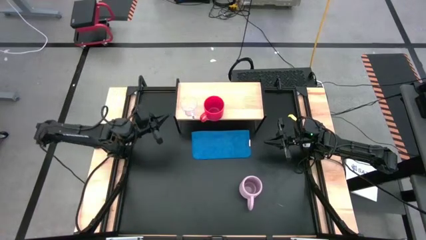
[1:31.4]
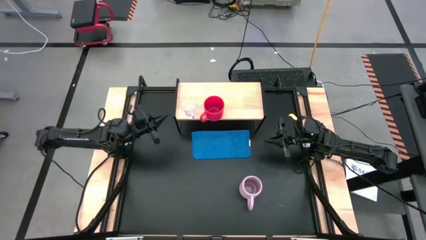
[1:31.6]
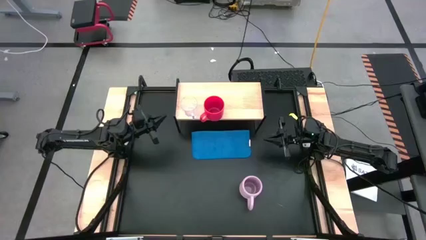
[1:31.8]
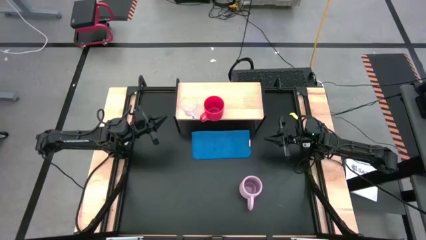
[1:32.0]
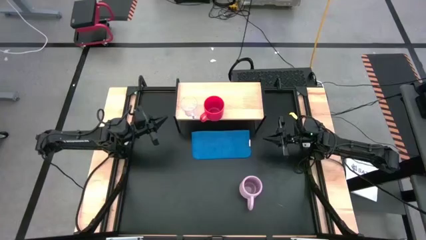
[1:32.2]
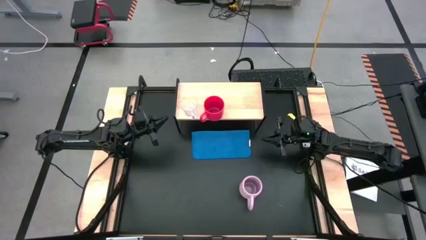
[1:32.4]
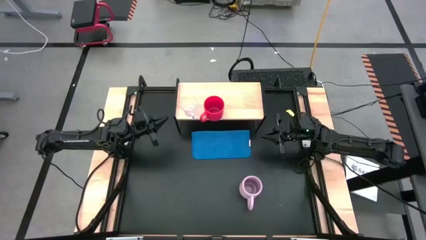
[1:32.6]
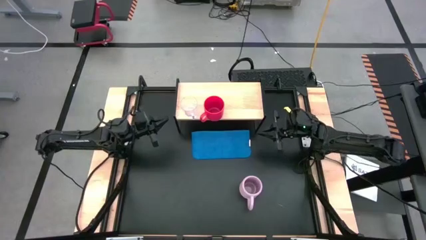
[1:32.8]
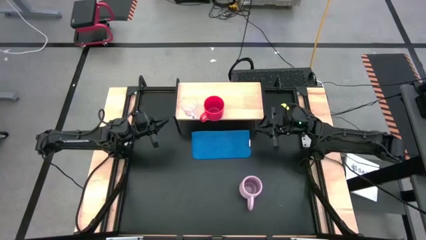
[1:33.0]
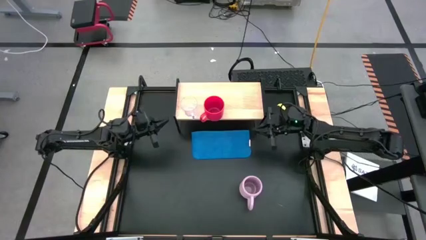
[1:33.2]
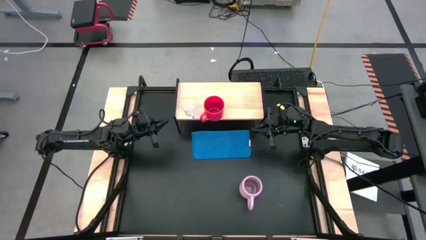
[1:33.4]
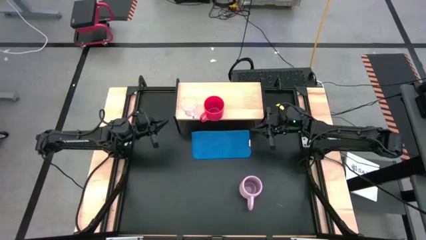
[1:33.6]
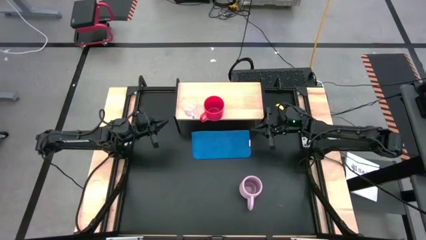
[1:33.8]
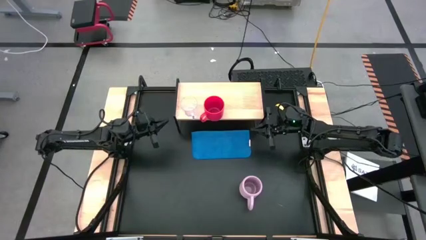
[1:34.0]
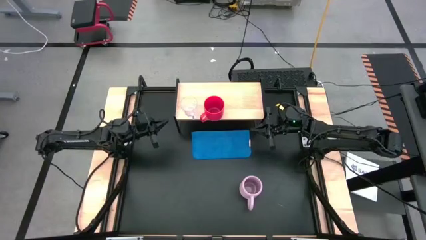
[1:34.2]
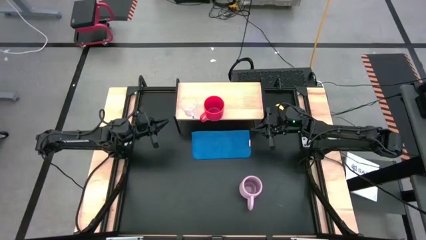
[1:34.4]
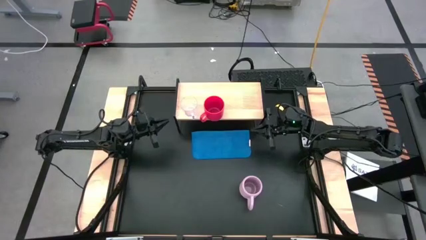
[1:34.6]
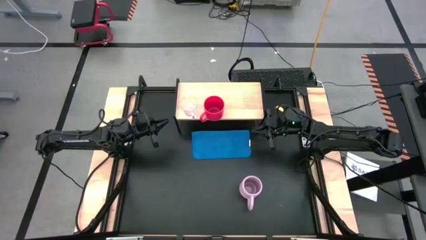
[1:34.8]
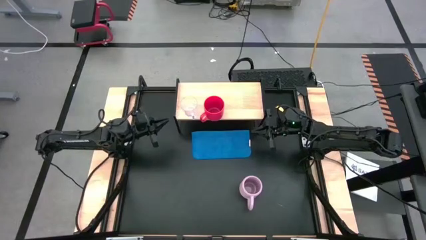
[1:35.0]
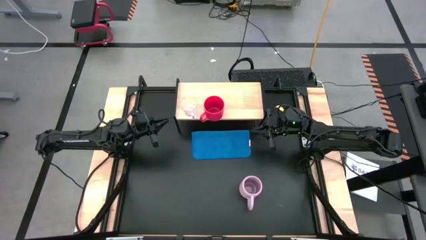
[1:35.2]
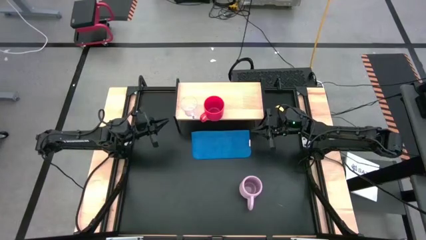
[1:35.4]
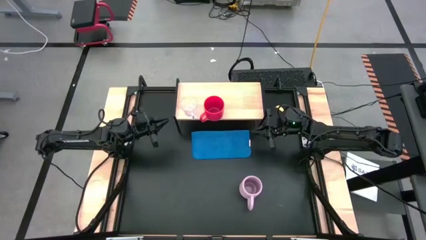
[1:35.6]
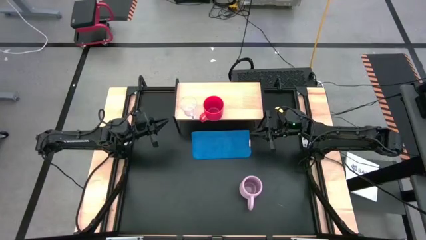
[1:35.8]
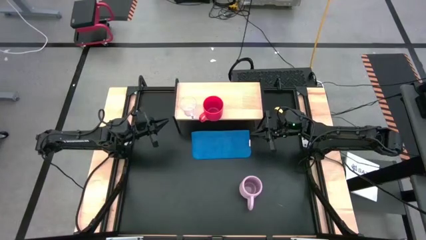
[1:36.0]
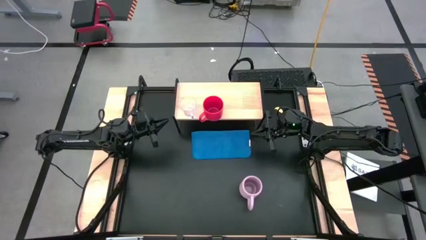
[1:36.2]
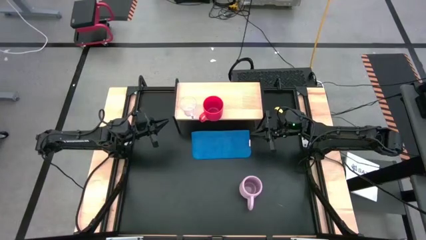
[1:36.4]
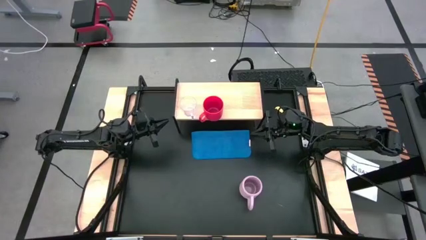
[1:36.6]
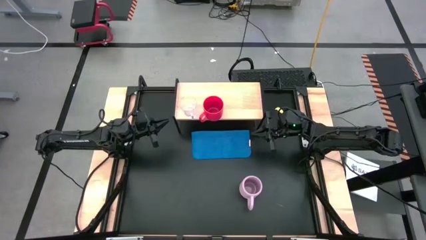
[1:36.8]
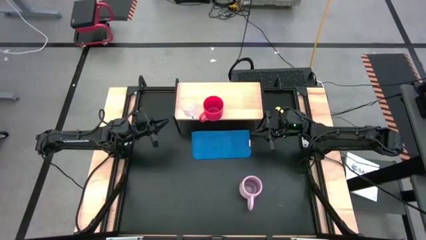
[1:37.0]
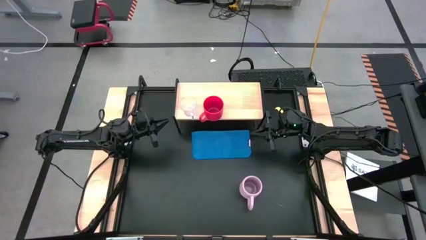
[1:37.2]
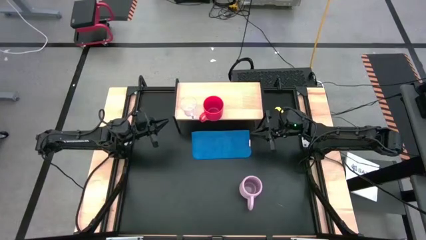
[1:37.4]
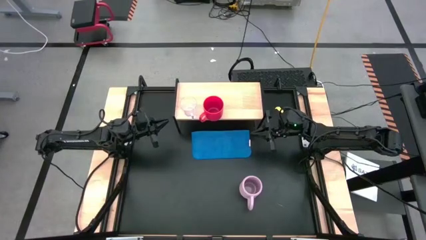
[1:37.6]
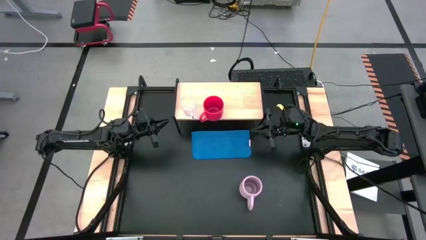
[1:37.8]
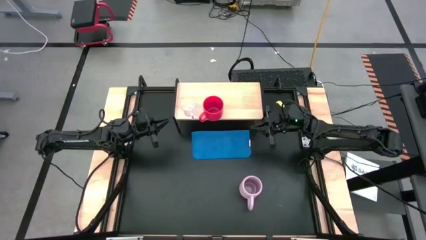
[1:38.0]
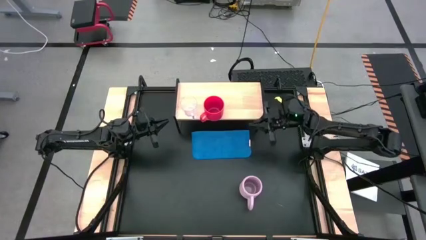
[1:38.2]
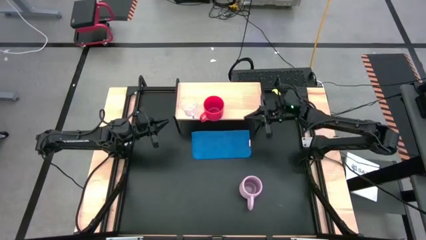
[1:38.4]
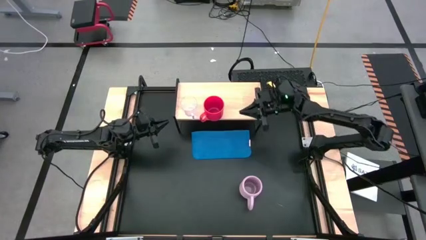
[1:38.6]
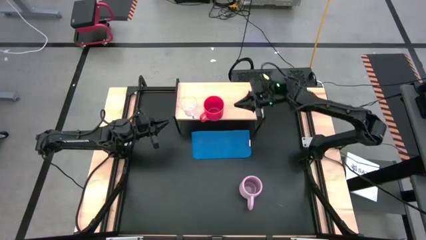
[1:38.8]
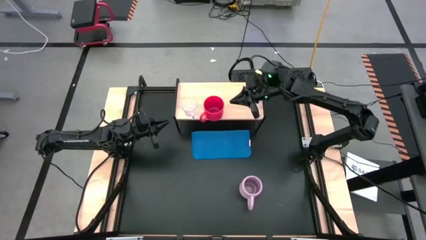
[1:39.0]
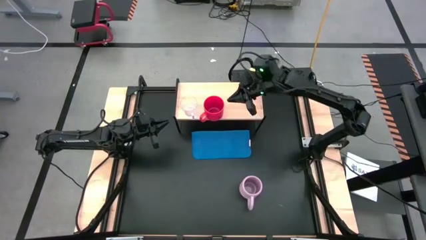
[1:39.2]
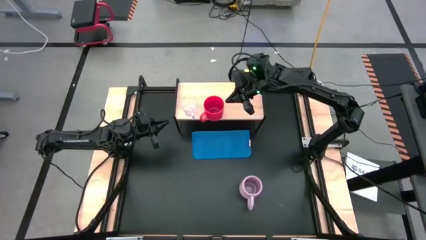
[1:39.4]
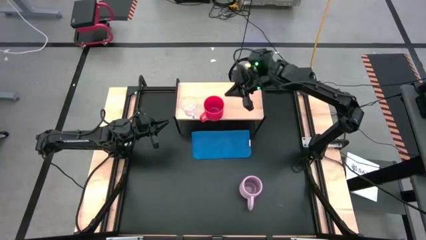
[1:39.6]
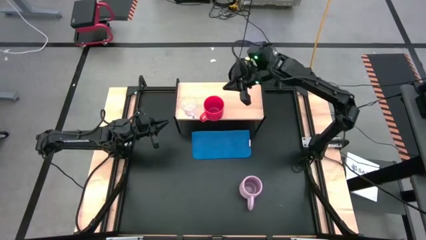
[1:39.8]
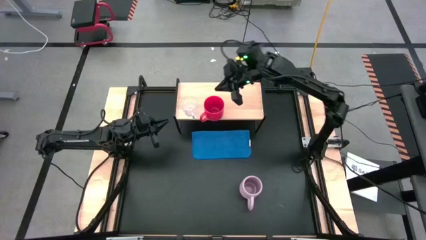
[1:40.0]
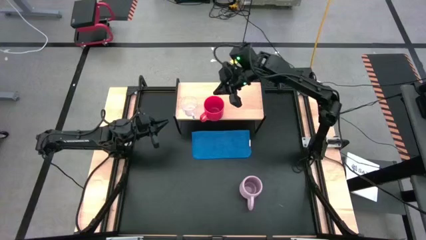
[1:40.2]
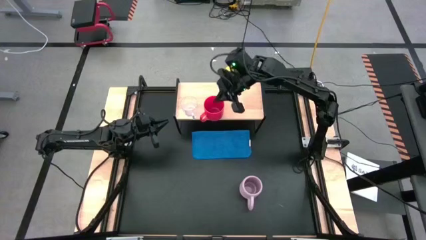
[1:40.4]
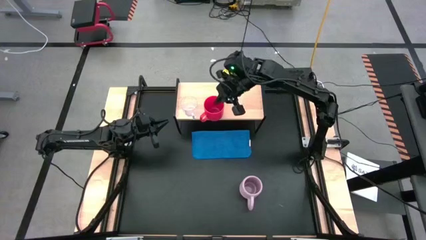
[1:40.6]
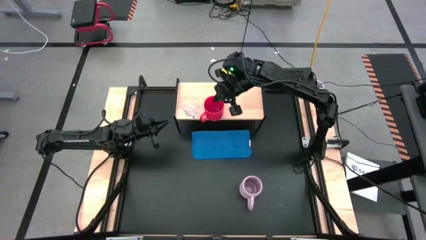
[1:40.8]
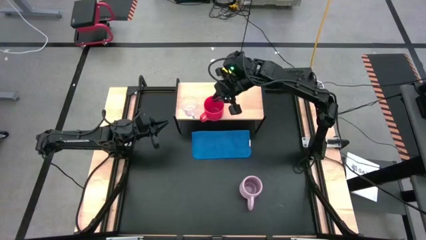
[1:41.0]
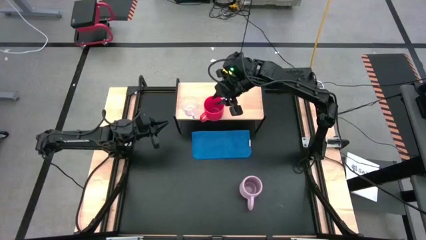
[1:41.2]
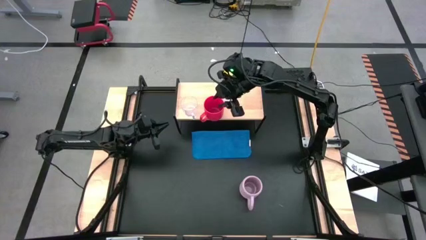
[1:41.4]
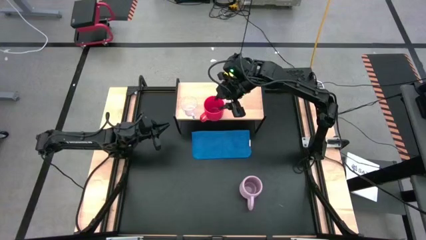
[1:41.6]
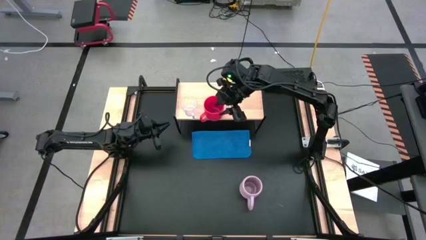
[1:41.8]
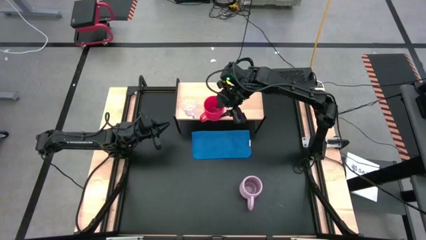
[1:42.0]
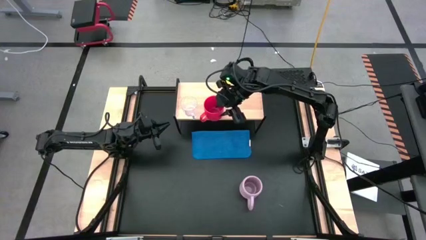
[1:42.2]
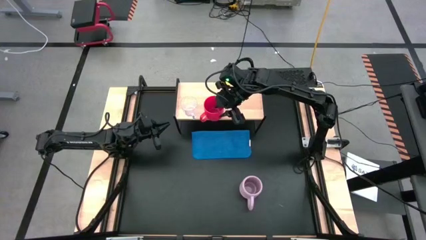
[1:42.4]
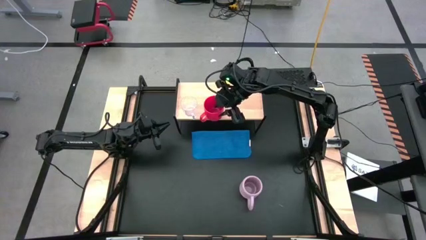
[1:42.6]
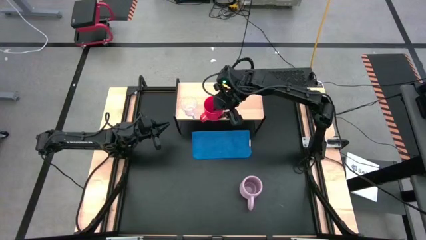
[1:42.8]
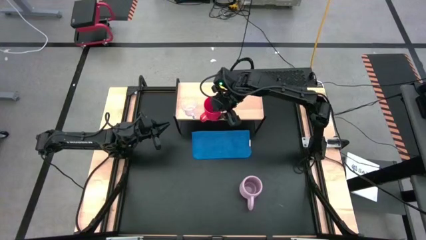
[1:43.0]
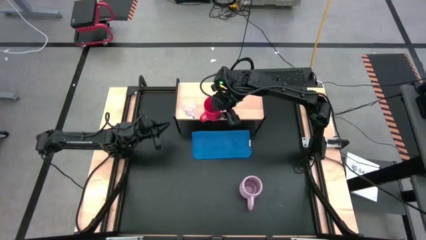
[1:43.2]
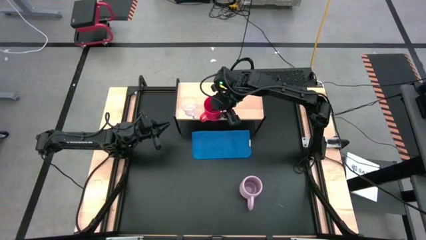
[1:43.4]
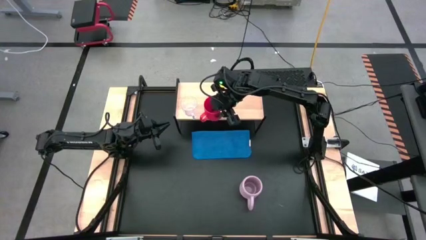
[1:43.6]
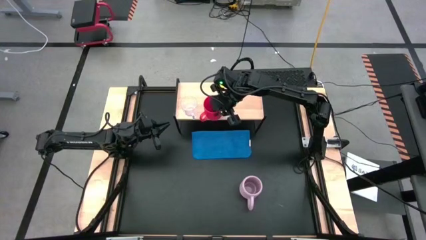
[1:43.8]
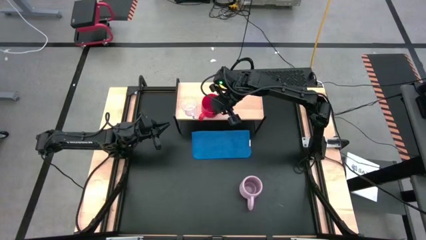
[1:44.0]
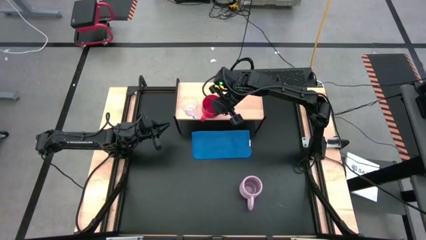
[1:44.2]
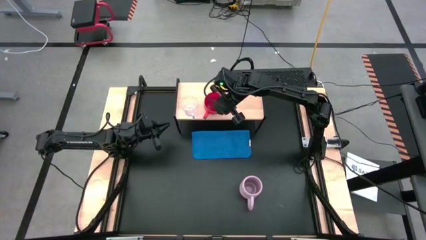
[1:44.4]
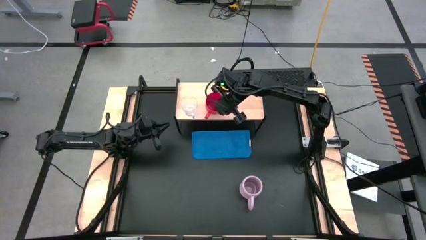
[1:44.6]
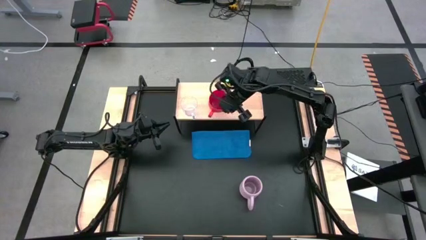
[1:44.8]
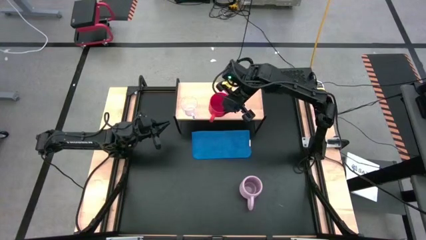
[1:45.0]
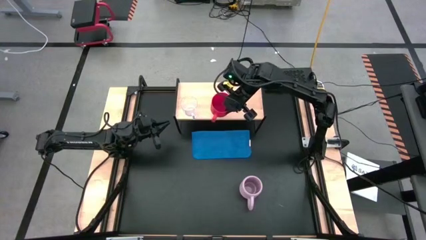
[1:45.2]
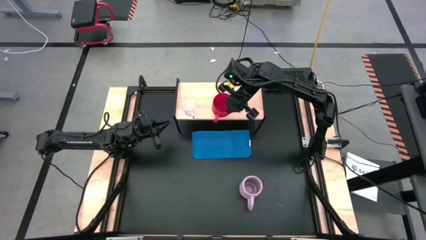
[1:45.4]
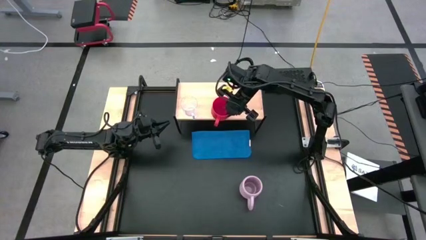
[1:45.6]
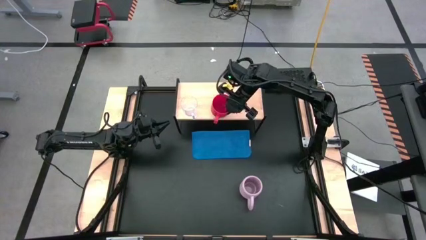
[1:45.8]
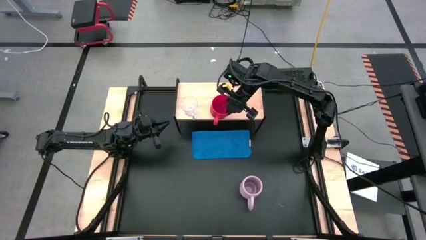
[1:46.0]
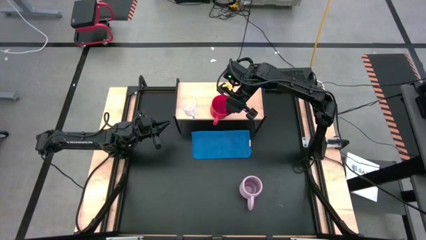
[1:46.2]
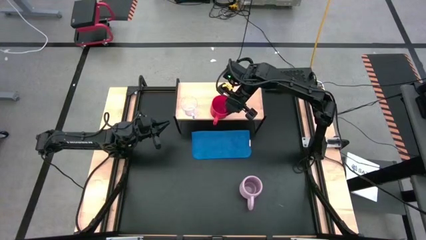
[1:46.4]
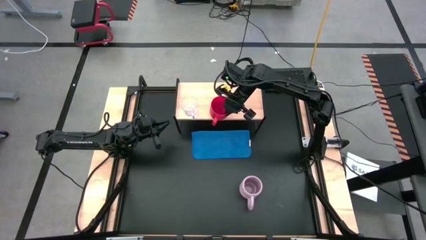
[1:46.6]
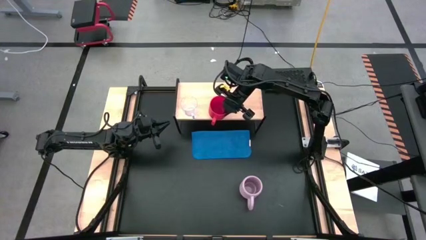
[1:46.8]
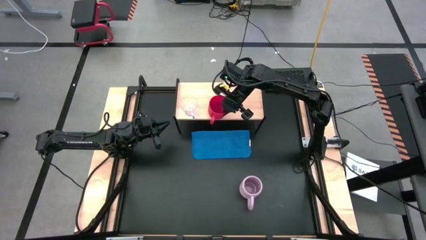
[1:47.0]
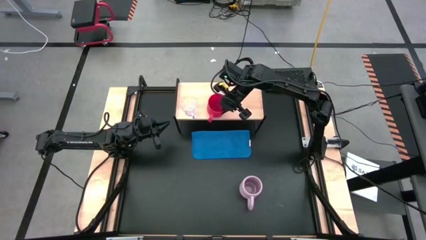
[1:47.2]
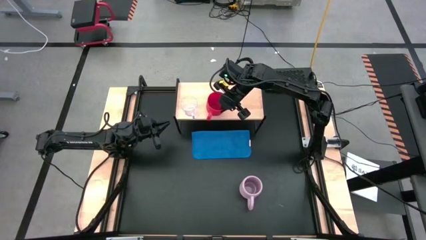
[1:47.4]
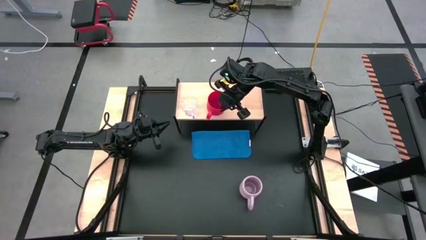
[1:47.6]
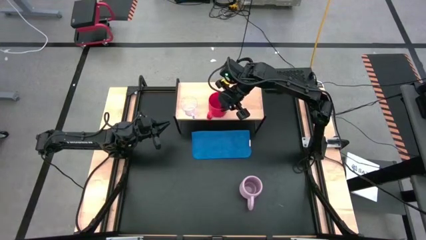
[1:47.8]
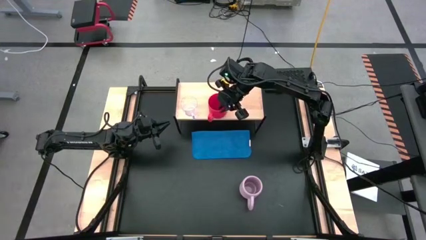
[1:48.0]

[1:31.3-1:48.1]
Task: Stack small to large cups/mugs on shelf
Put the red mug on the shelf
